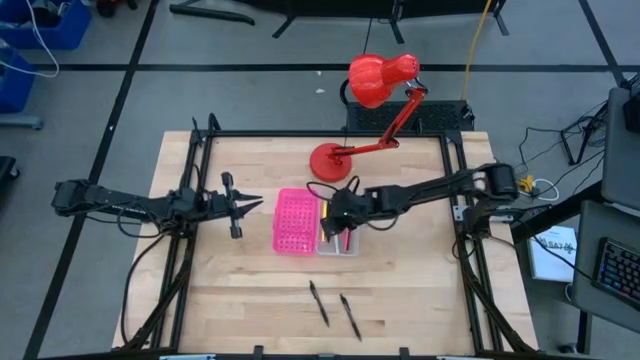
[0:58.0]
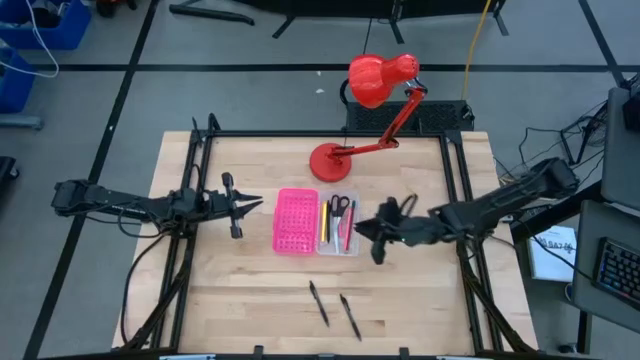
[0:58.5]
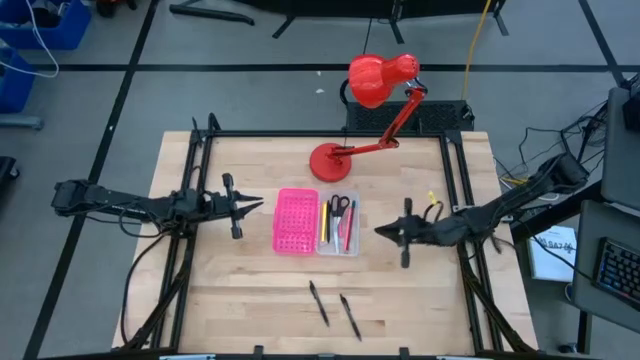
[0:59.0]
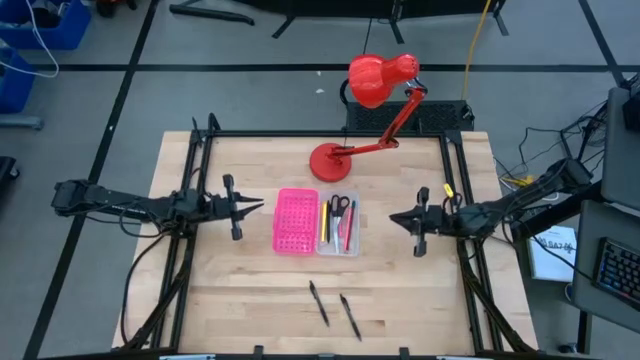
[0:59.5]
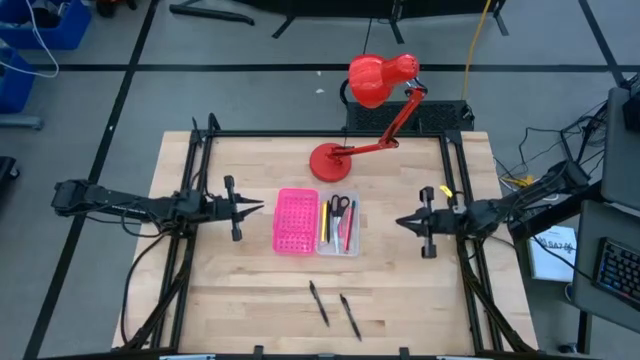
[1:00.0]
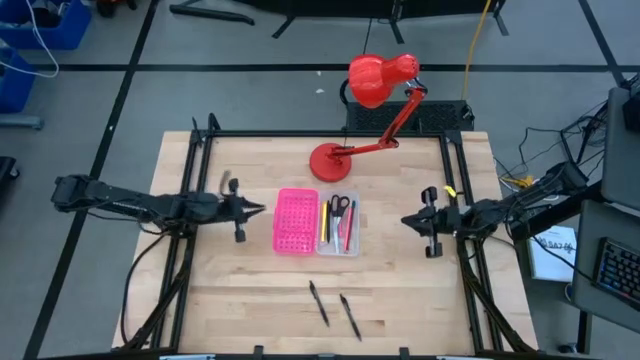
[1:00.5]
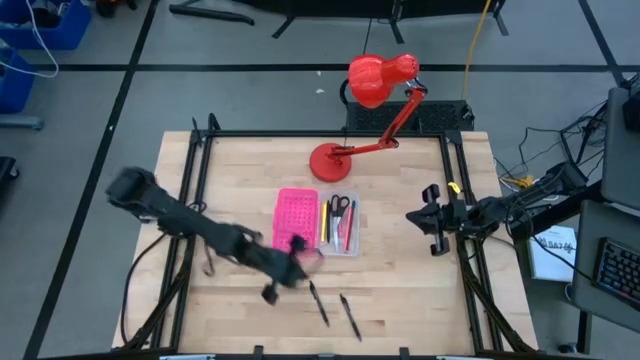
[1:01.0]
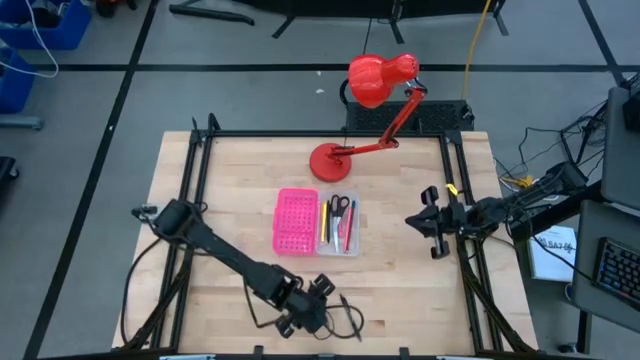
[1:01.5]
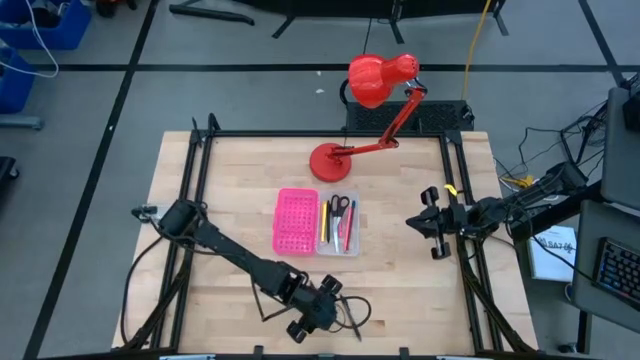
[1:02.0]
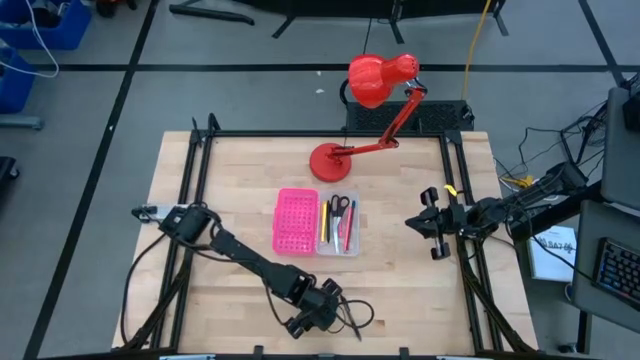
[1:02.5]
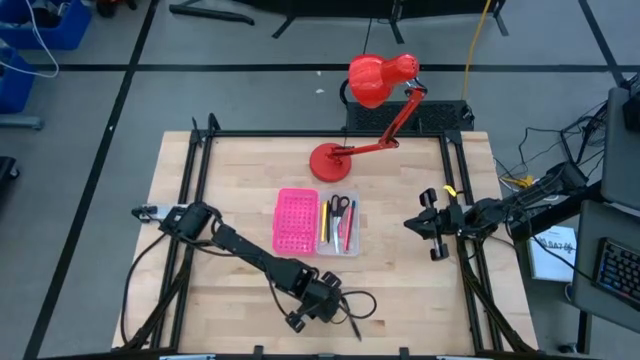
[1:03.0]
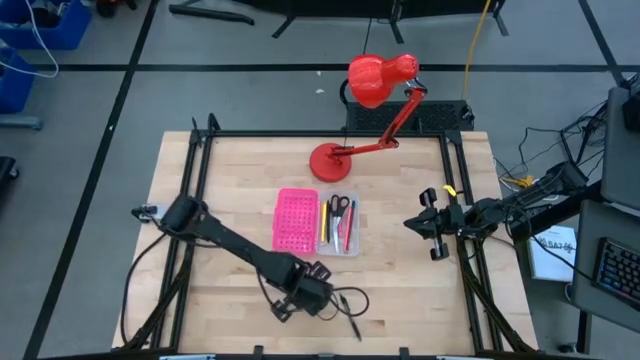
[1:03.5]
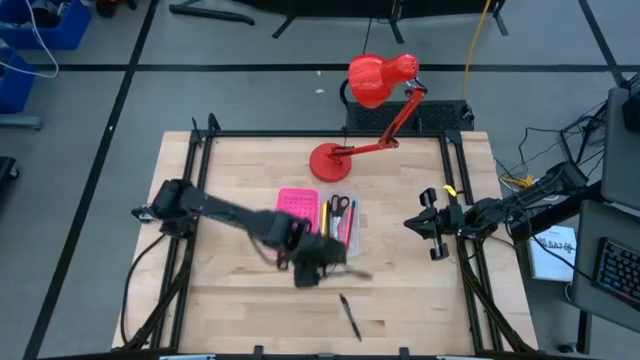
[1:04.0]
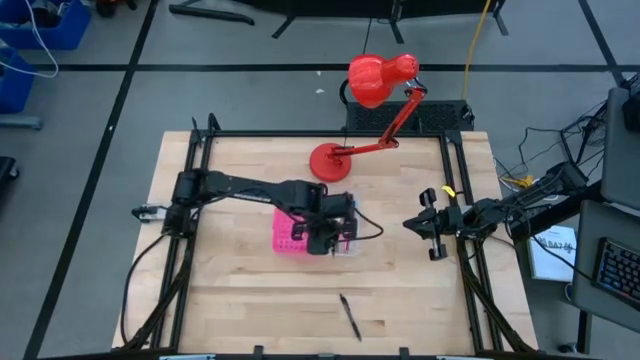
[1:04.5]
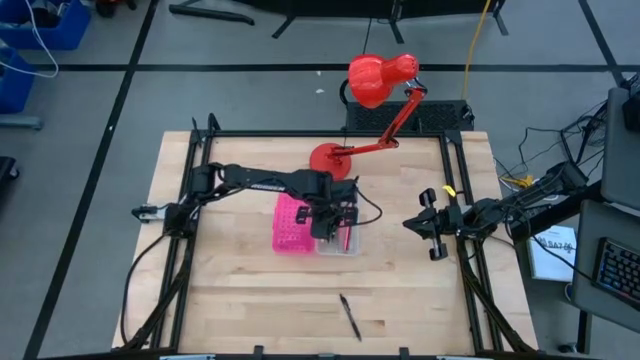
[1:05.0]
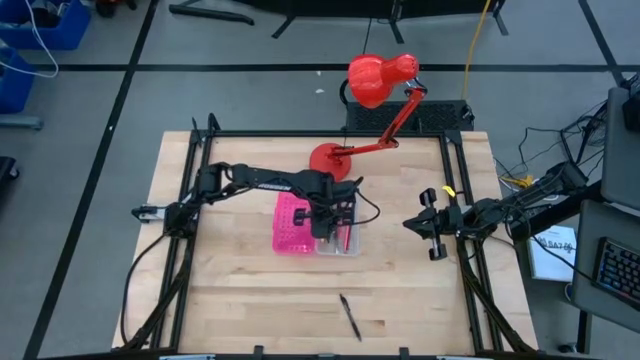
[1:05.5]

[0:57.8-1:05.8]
Task: Pick & place school supplies into a supply box
Put the left black pen into the pink supply box

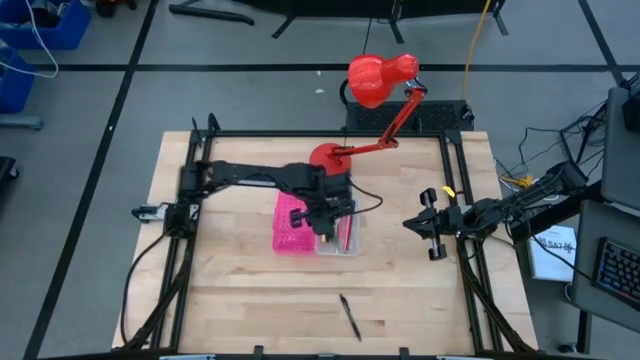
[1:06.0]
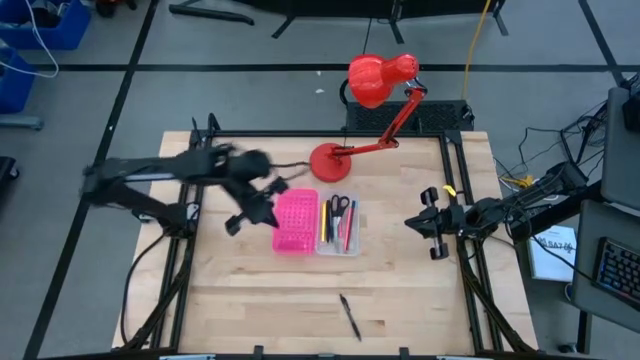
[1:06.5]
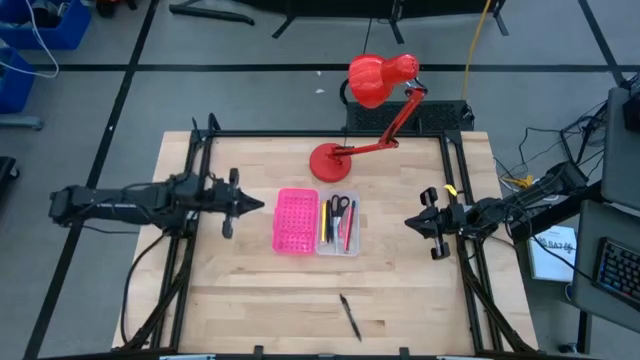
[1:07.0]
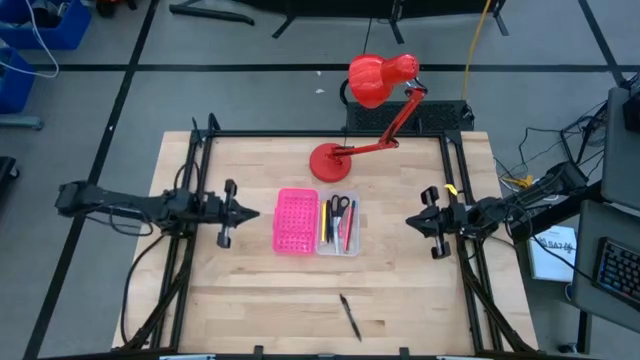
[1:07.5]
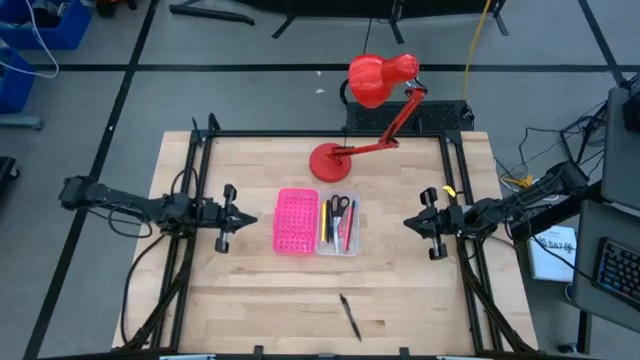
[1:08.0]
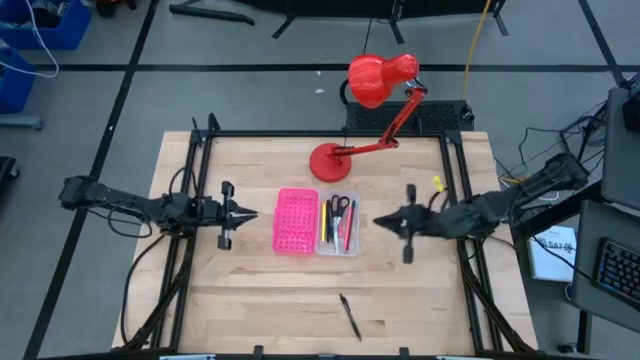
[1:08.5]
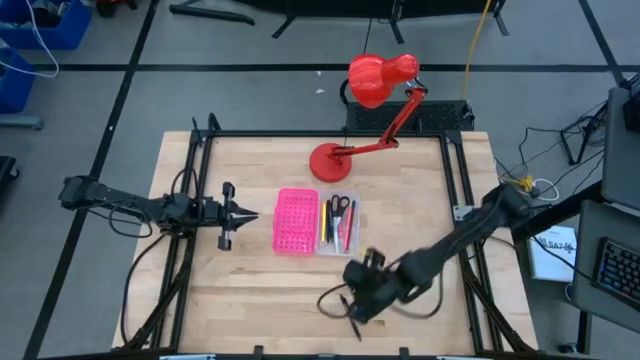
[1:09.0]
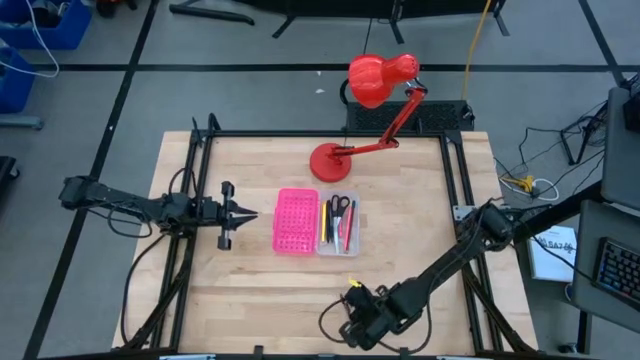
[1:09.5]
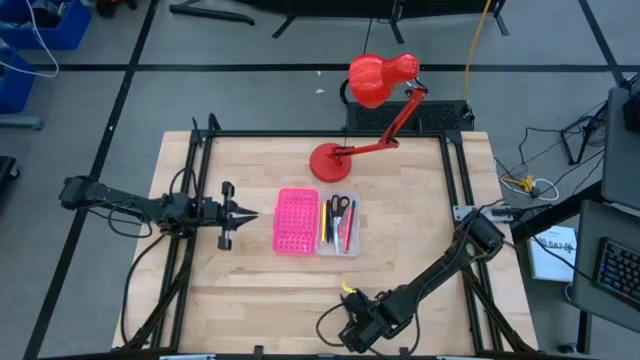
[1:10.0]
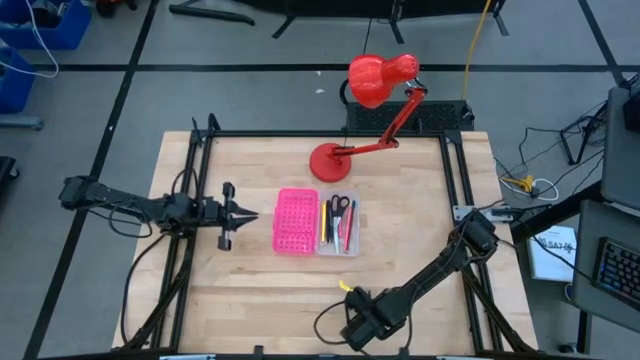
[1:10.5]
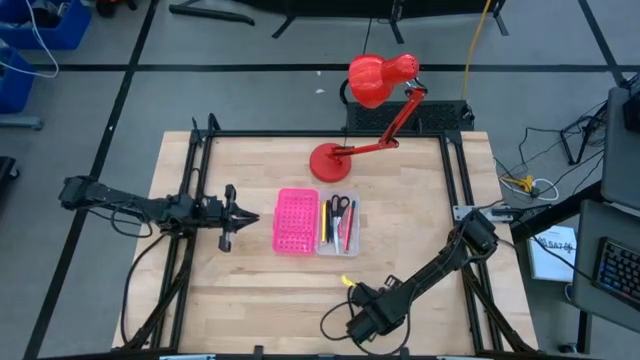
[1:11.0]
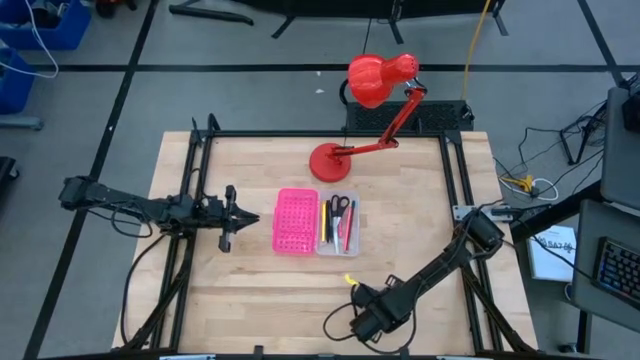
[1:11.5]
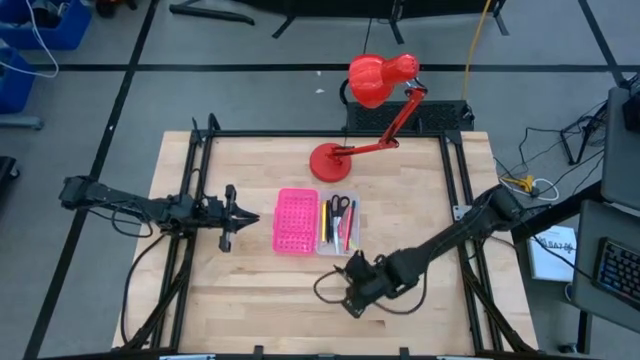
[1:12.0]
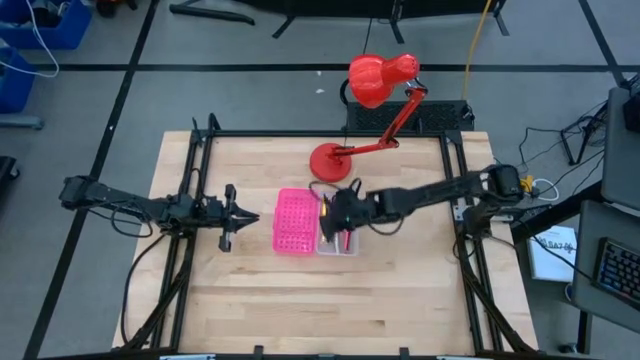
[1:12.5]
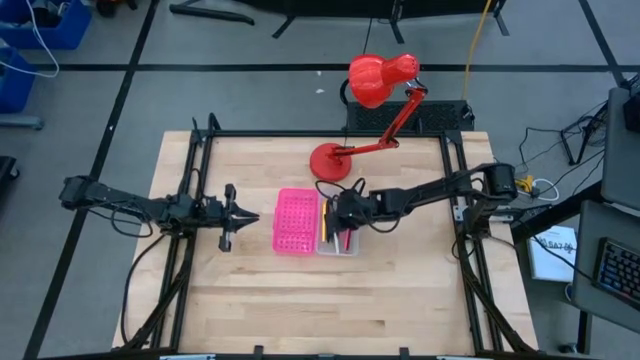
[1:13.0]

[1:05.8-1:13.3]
Put the black pen into the pink supply box

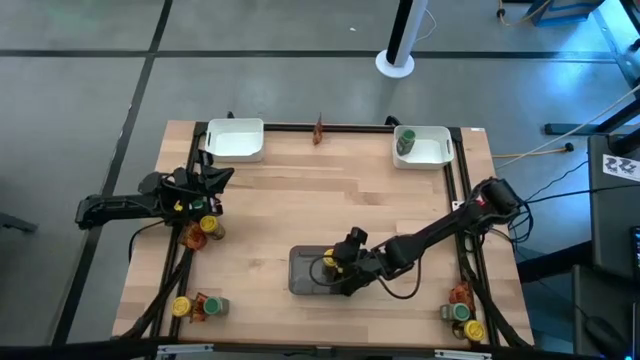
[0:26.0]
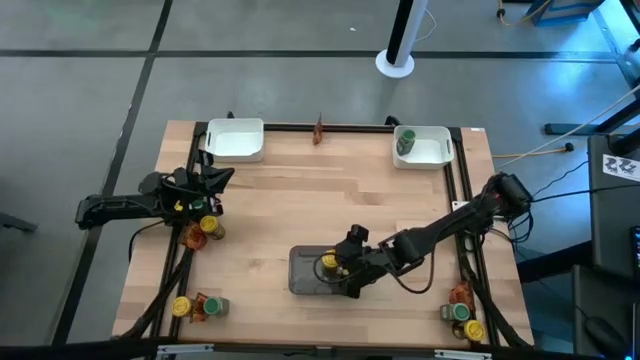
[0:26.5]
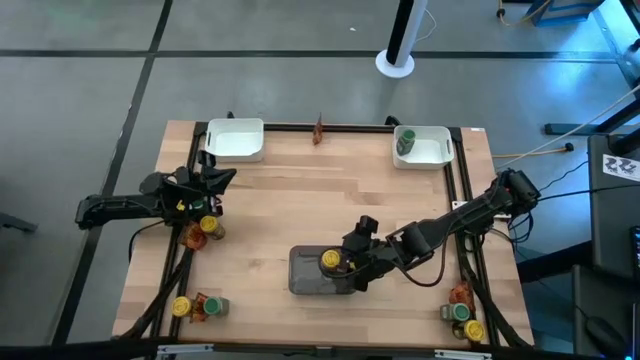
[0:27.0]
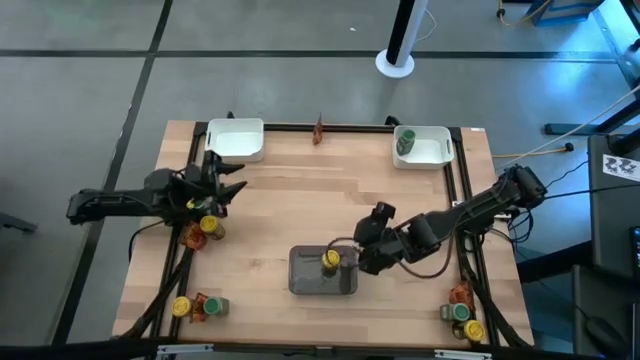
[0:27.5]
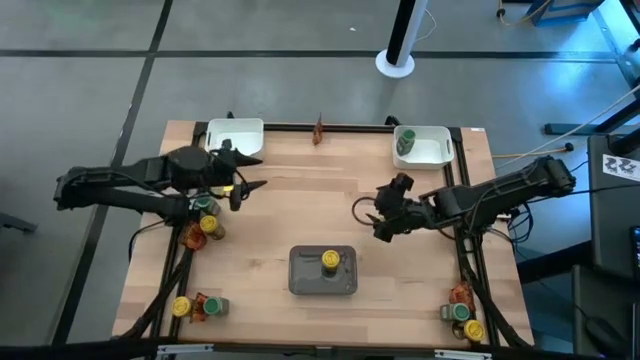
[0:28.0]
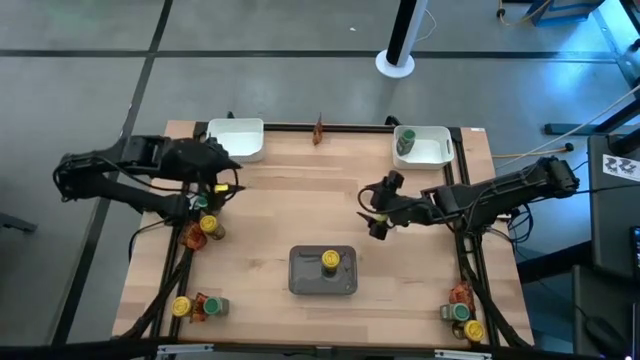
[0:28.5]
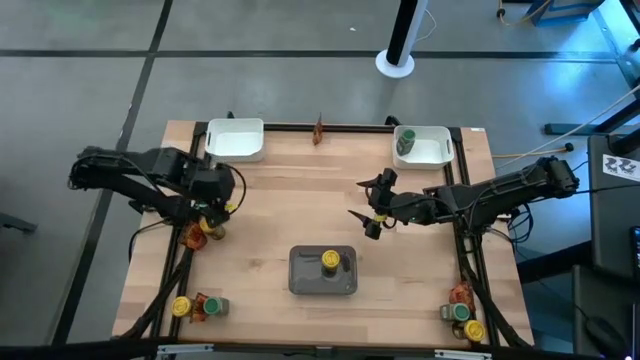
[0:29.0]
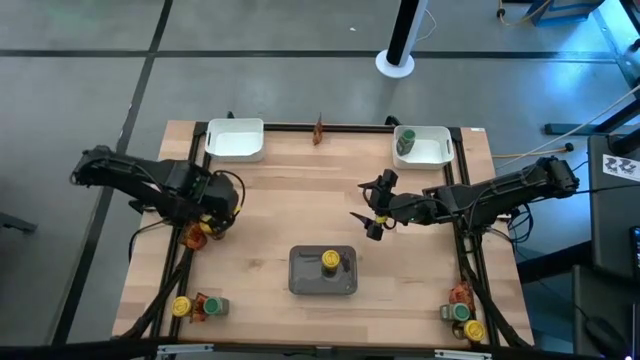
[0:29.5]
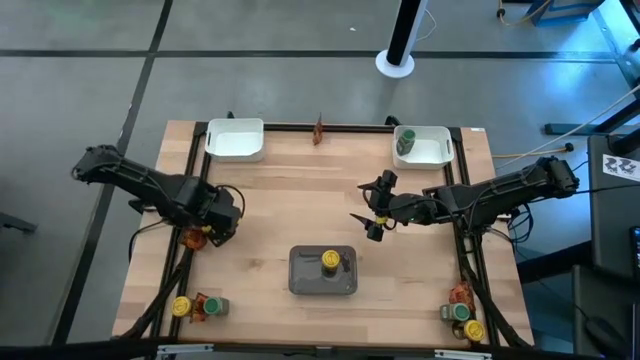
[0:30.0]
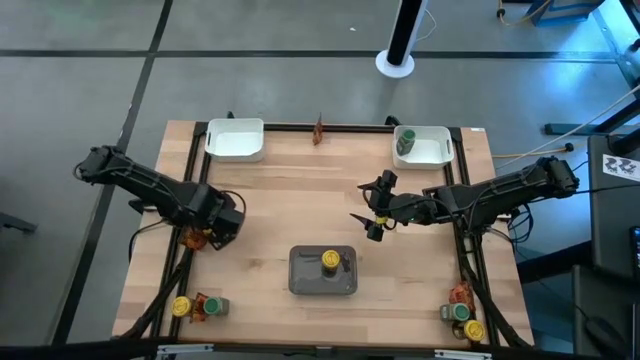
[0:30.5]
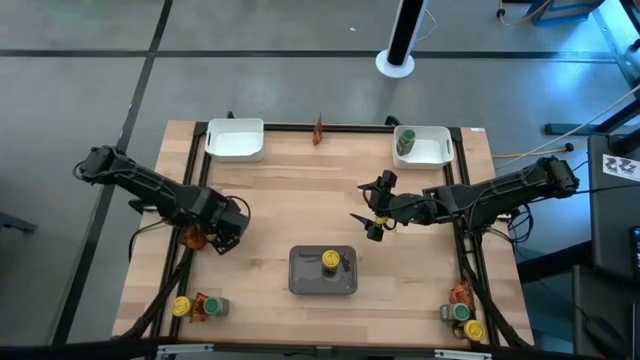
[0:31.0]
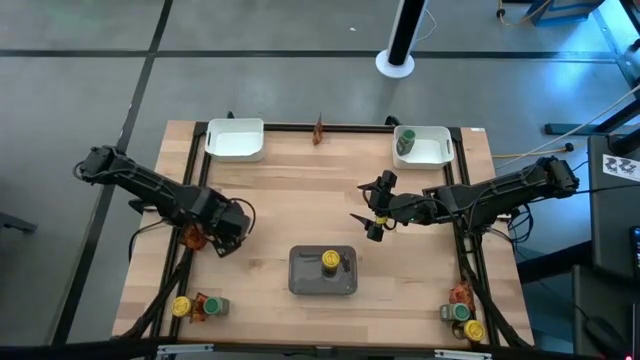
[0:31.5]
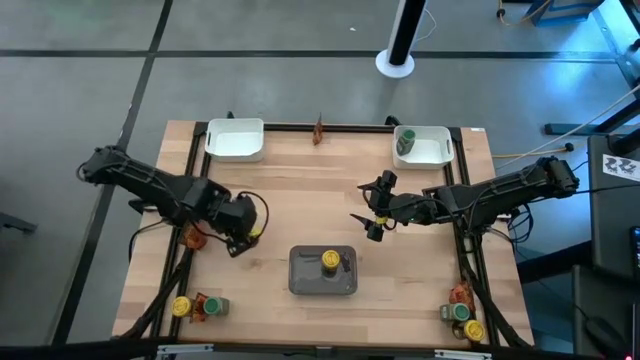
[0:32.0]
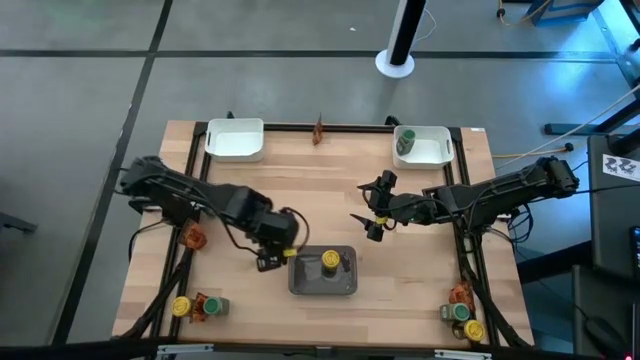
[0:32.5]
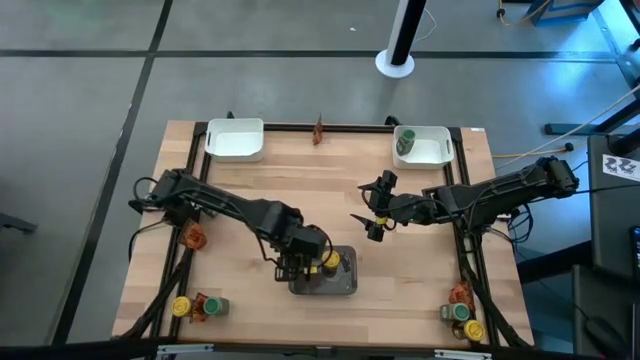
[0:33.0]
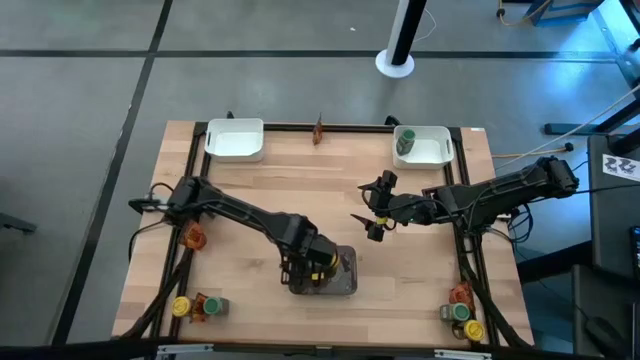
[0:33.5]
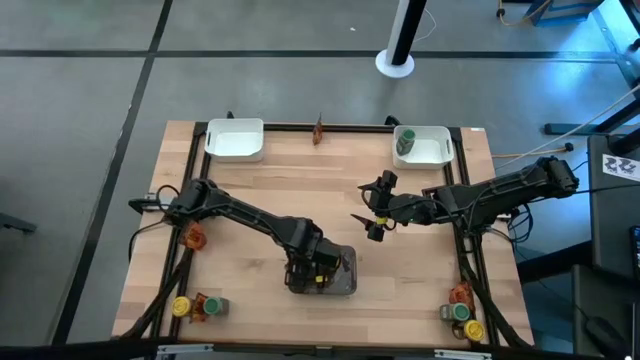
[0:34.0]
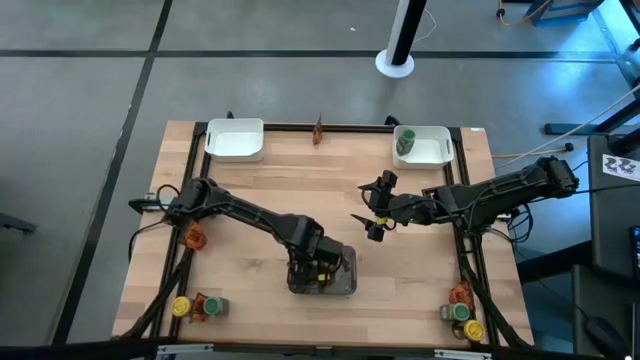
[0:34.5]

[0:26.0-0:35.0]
Task: Sort spices by type
Put the middle right yellow seasoning bottle into the black bin
